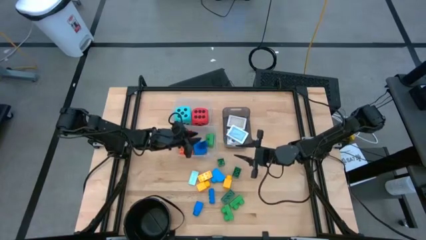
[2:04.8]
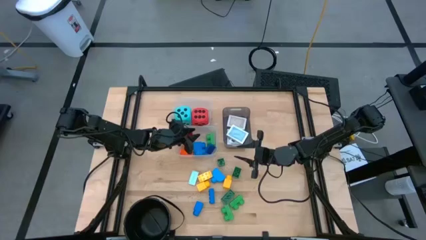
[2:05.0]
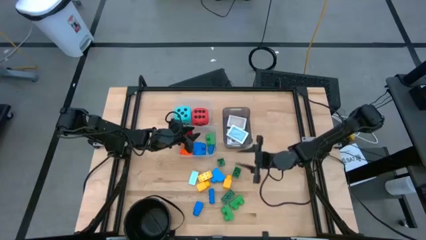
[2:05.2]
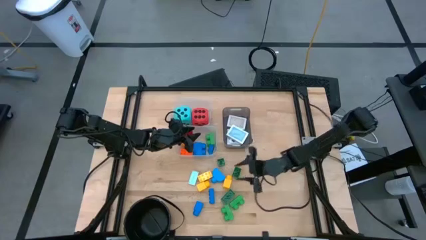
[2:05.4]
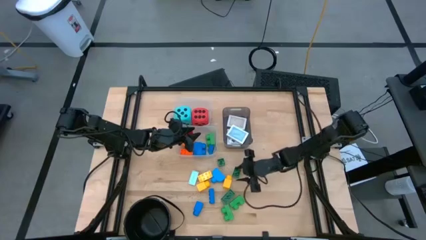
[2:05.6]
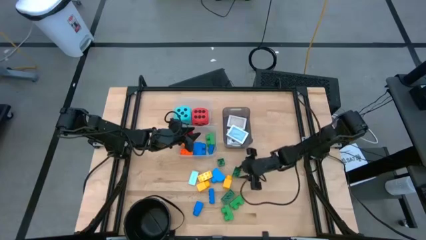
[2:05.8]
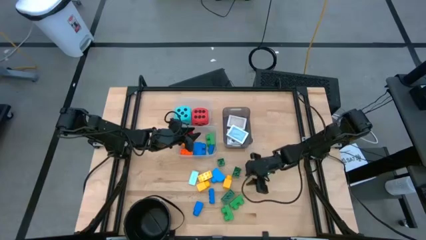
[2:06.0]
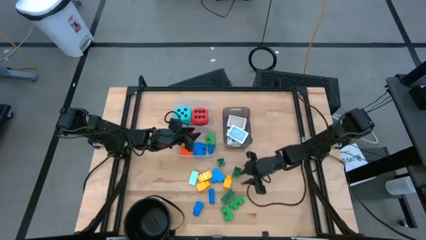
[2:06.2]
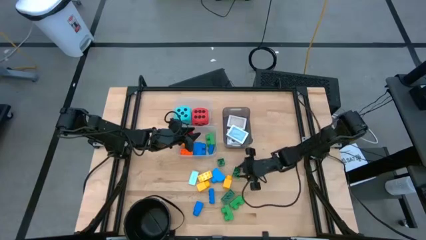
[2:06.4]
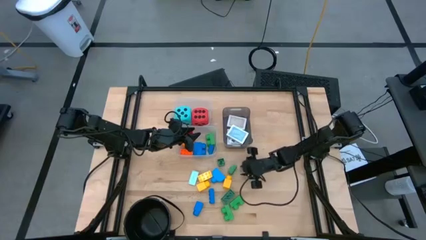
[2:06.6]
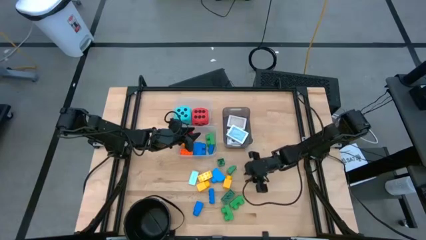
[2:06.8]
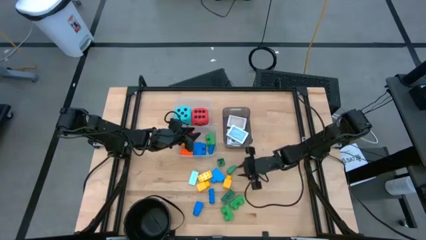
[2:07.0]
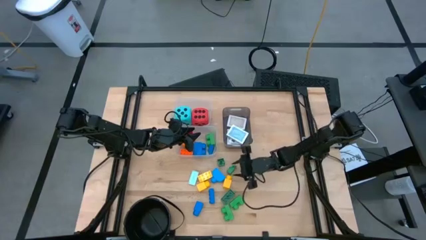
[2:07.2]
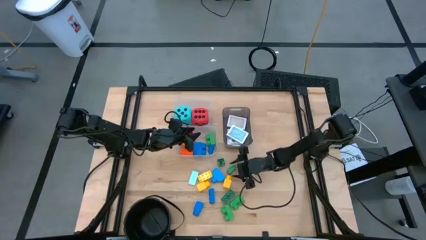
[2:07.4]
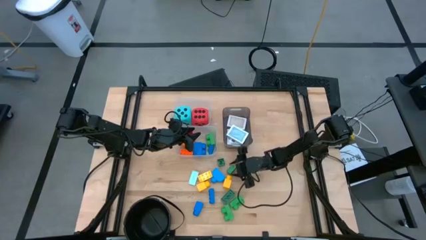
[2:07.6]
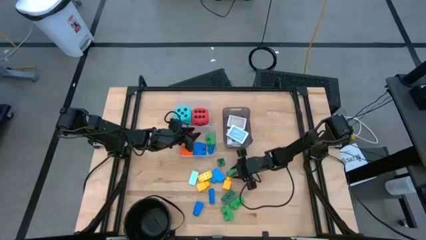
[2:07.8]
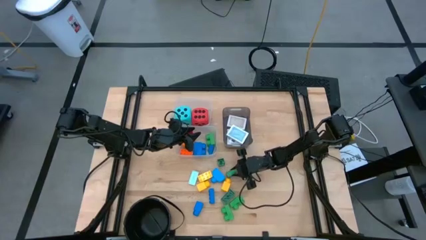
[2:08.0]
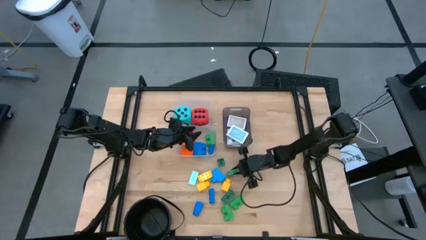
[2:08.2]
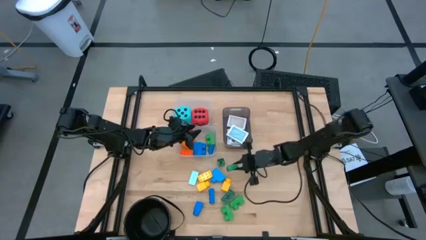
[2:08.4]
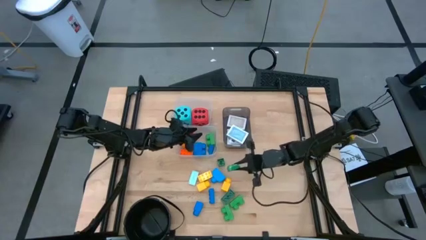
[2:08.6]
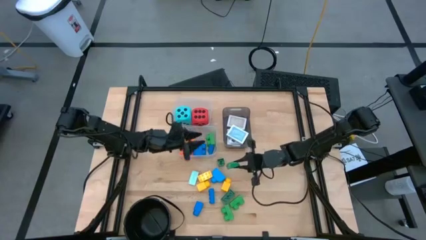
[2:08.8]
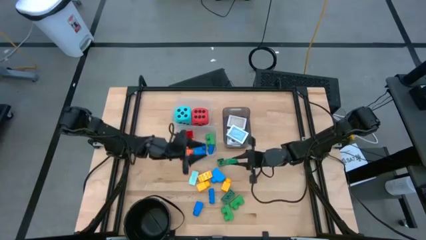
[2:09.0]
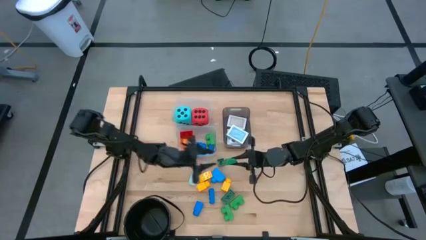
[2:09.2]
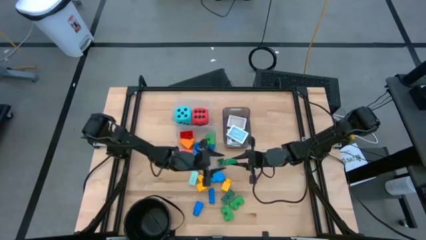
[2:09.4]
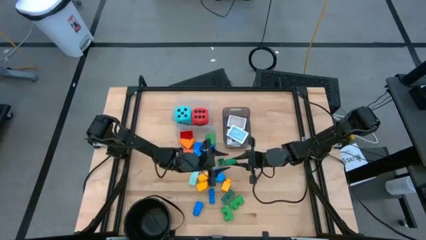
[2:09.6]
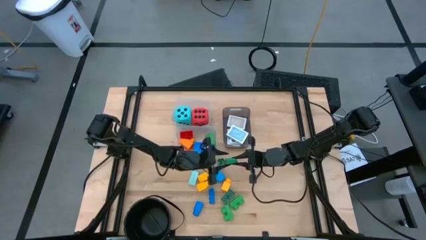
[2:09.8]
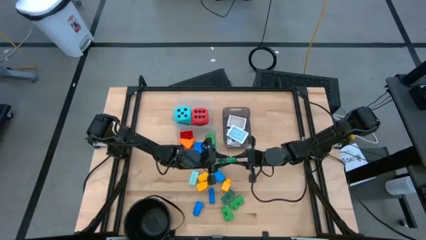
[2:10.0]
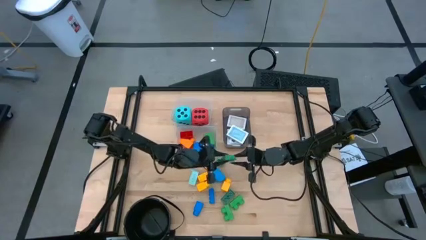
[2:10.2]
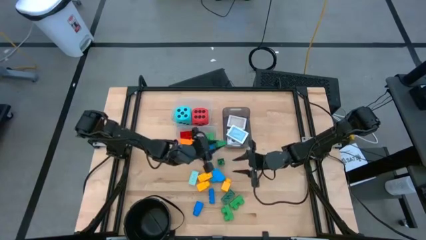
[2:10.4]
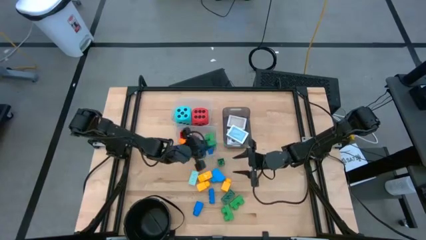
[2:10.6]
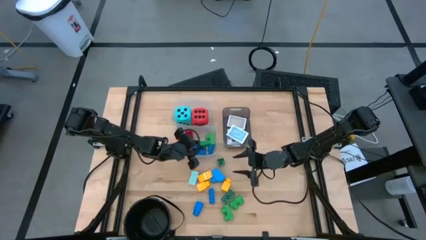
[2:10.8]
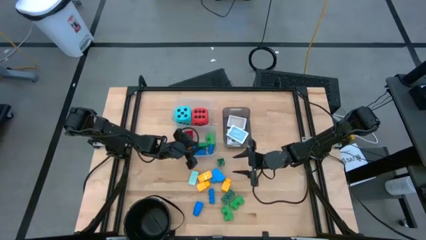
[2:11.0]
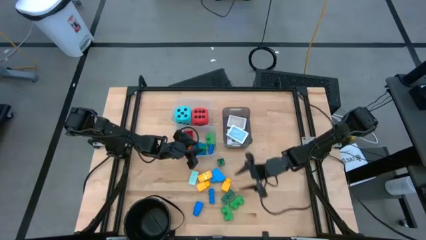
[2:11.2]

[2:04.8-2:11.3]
Task: Pick & Place Toys
Put the green game piece into the bottom transparent bin

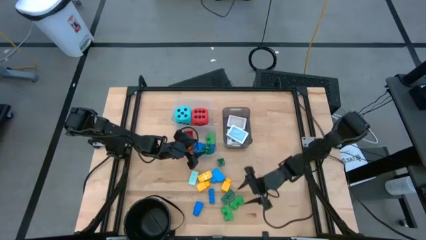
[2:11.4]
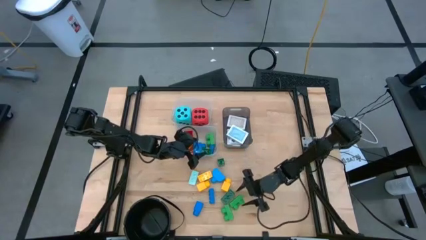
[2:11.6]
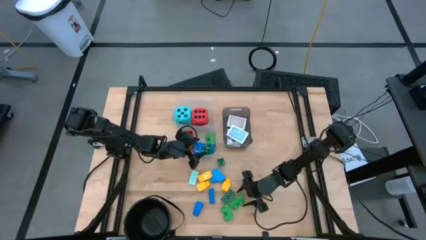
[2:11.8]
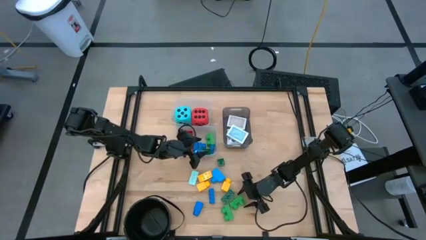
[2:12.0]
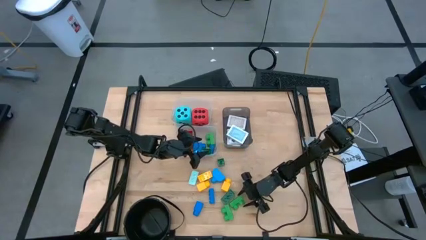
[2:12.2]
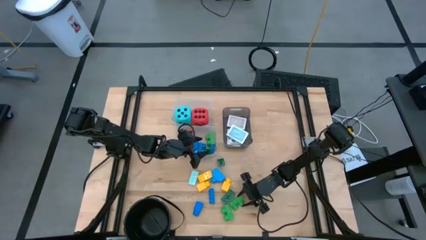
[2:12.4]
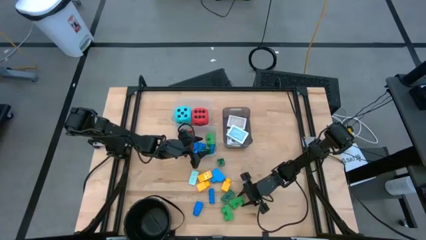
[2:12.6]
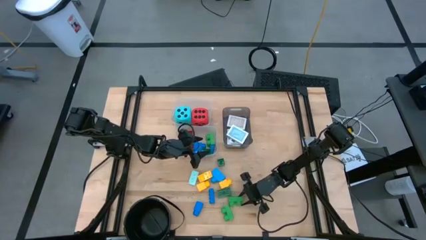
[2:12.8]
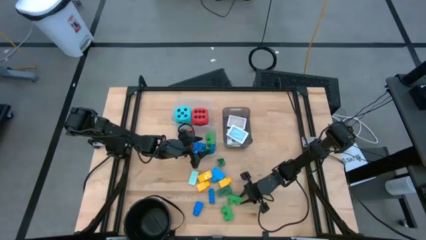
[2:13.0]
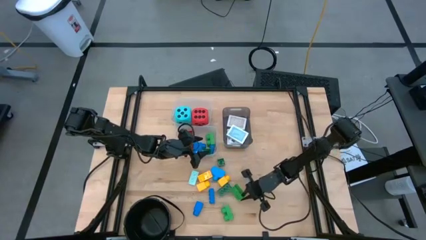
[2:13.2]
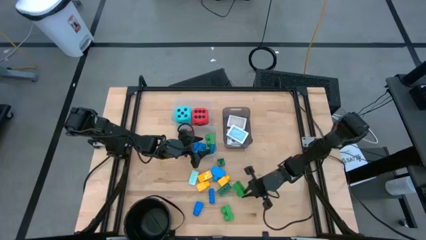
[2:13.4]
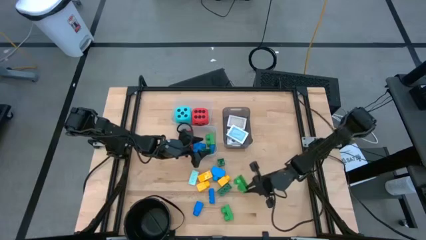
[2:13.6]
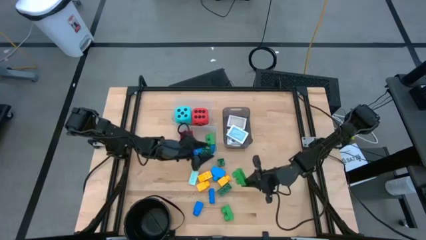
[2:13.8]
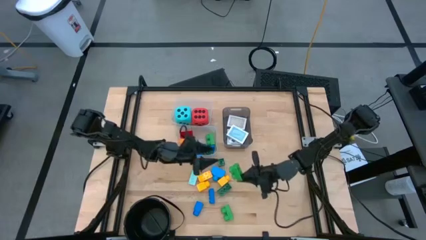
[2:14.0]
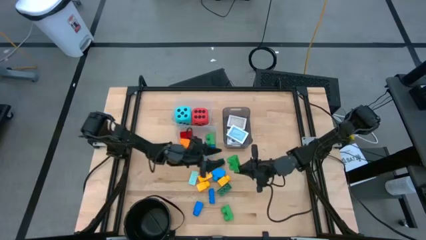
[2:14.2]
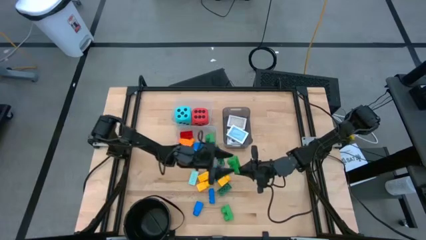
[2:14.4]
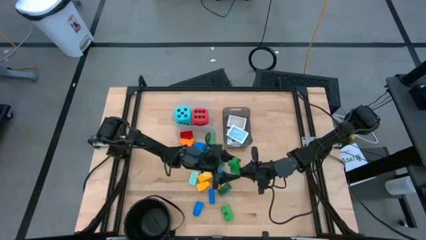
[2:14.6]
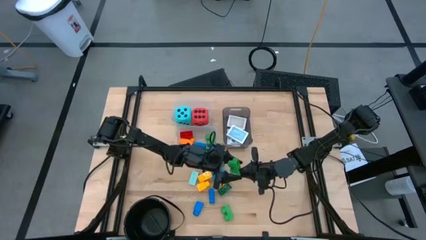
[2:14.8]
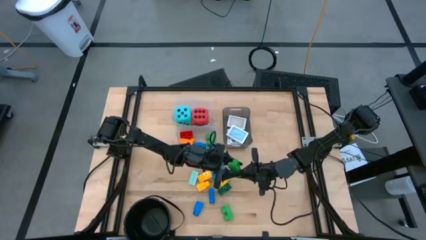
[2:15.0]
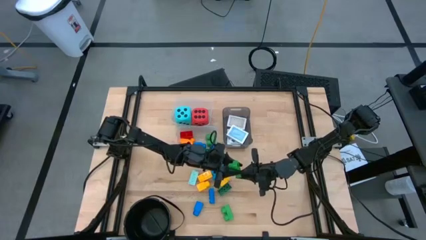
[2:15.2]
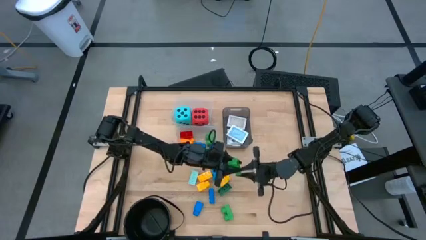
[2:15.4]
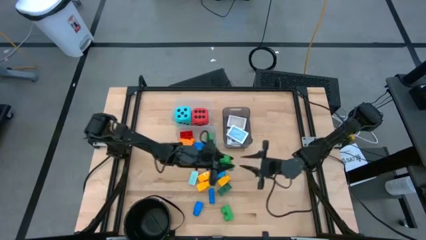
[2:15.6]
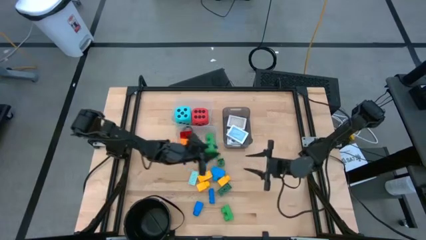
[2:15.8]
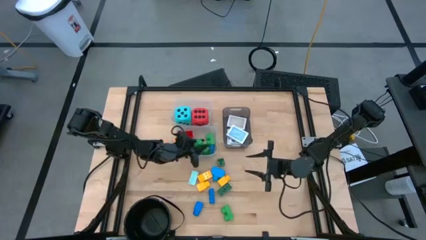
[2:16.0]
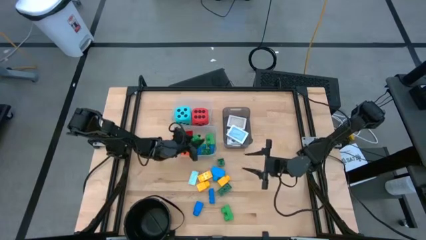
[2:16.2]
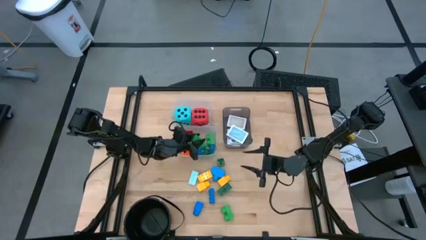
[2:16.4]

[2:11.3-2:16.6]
Put the green game piece into the bottom transparent bin

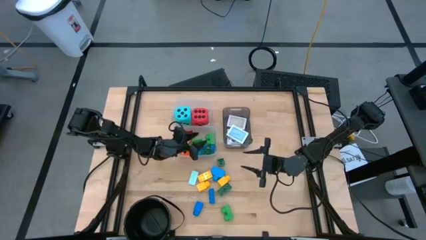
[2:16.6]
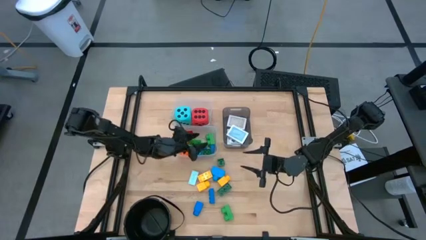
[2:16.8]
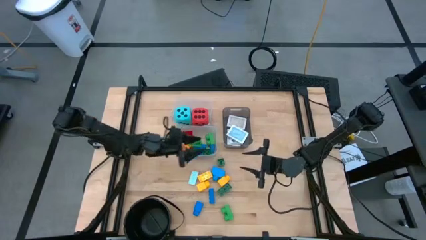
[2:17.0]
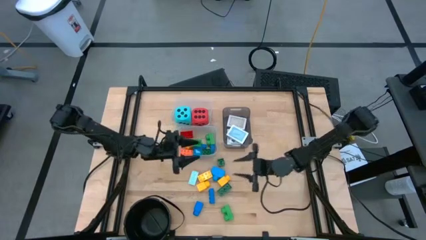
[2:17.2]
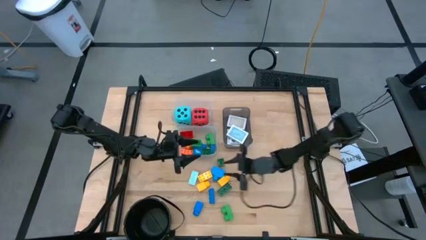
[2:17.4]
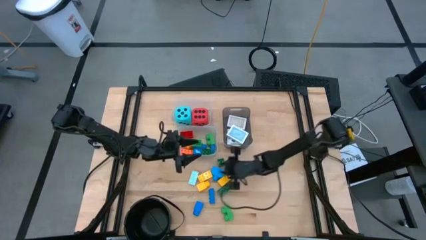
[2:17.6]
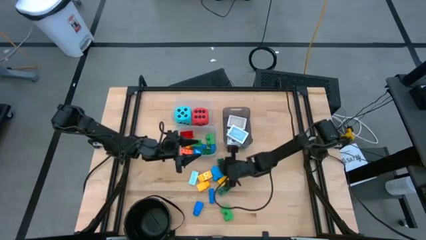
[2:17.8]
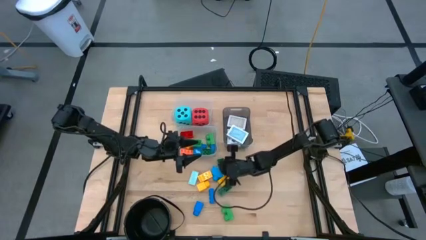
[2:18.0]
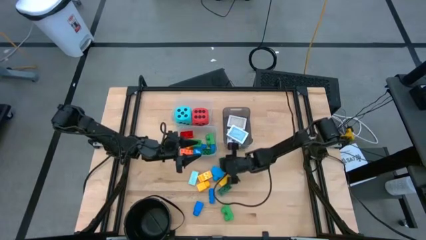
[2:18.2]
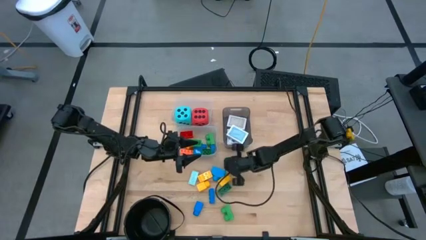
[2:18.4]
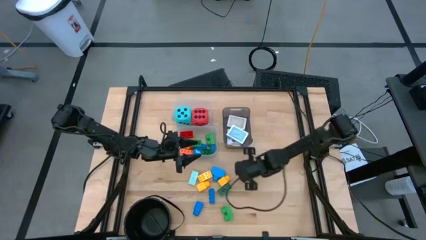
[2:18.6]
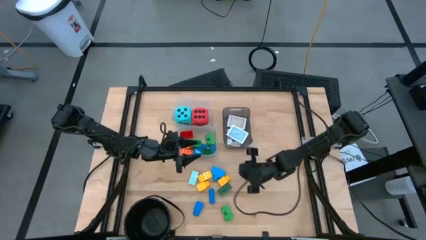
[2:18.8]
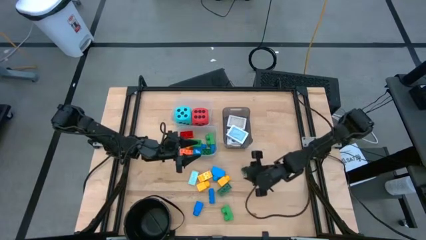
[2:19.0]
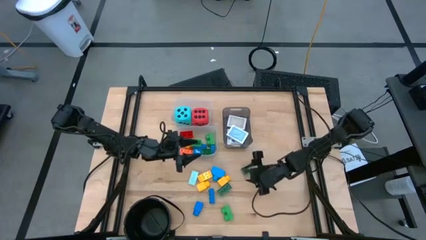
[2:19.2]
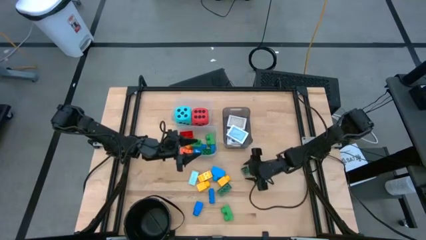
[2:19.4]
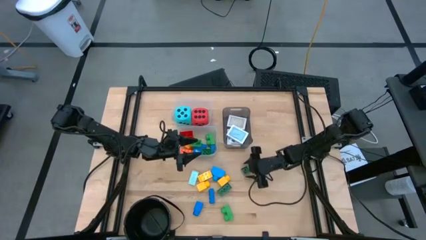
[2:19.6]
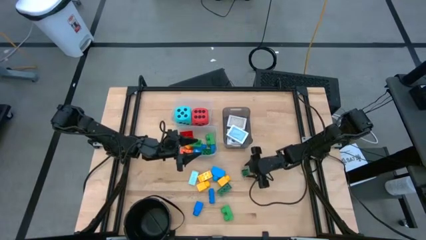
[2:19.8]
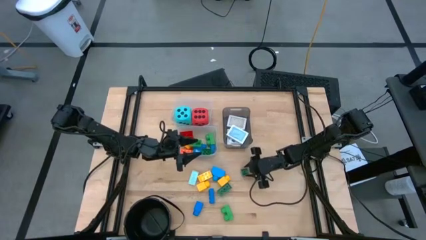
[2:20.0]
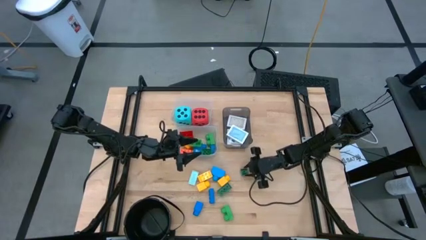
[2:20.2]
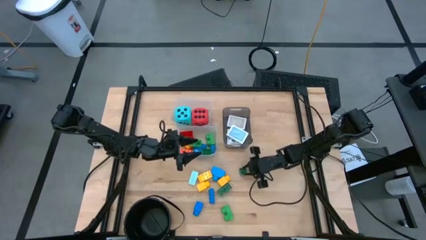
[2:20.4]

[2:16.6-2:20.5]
Put the green game piece into the bottom transparent bin

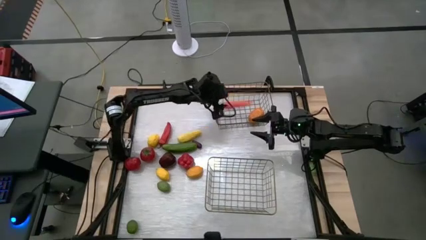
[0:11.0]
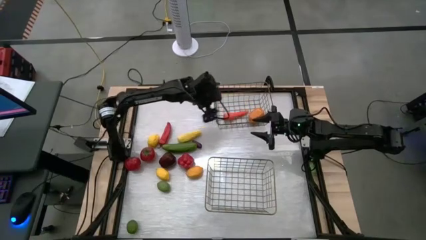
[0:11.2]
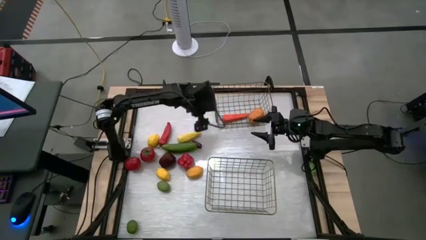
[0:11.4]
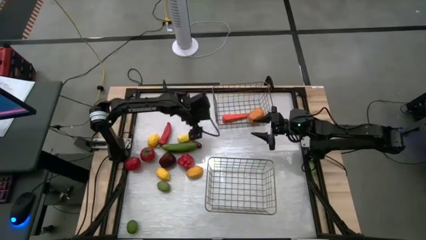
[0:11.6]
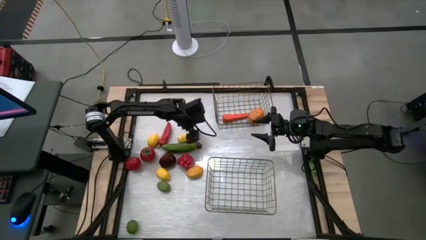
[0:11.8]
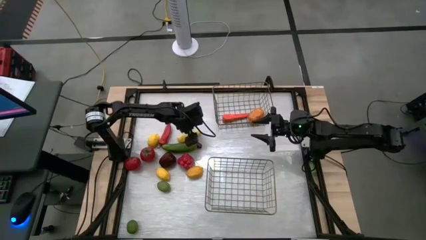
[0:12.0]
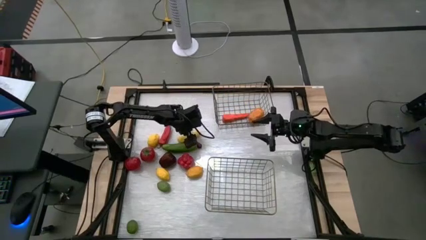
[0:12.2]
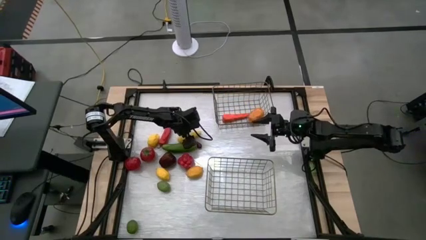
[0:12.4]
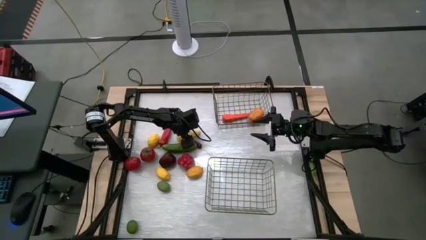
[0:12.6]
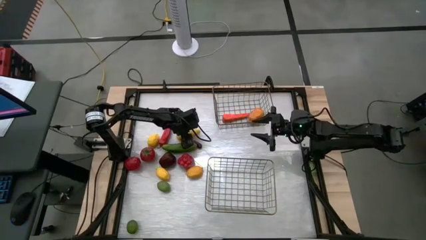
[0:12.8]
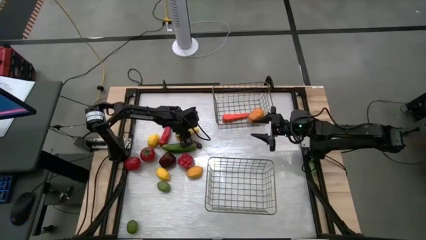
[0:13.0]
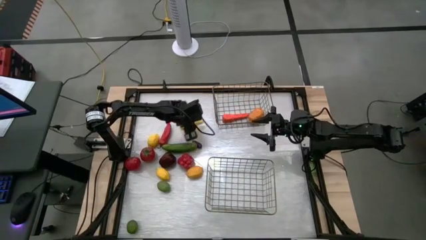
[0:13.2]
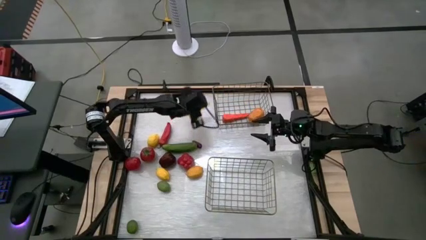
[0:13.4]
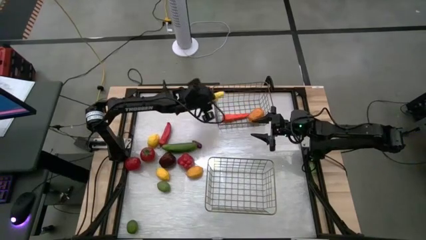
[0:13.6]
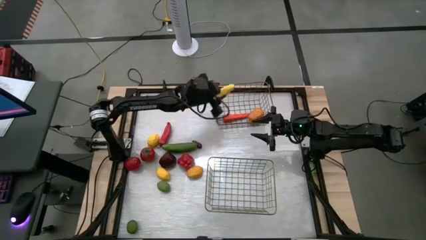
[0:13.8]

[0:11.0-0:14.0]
Task: Sort produce into baskets
Put the yellow corn into the top wire basket
